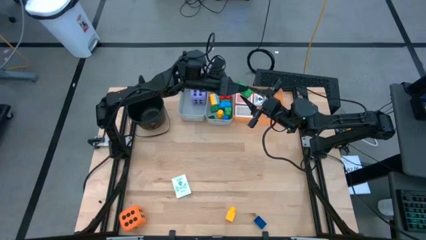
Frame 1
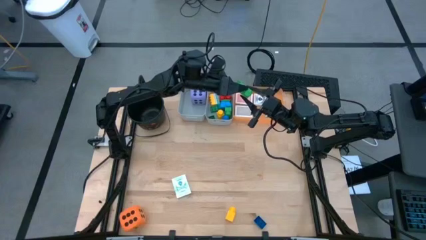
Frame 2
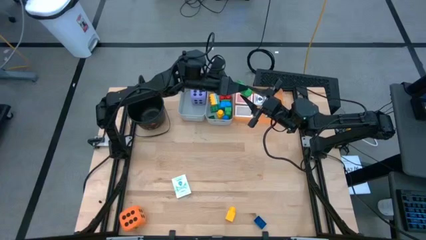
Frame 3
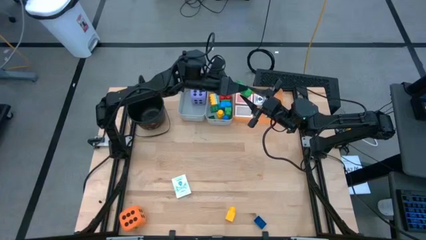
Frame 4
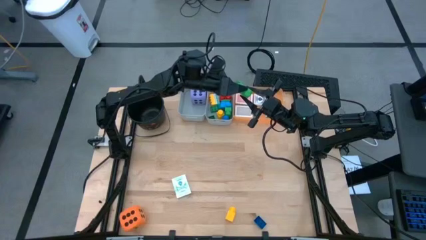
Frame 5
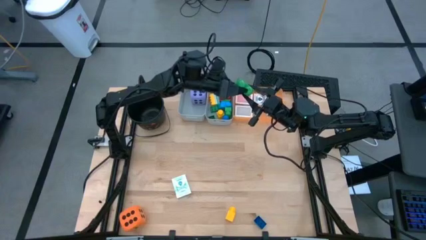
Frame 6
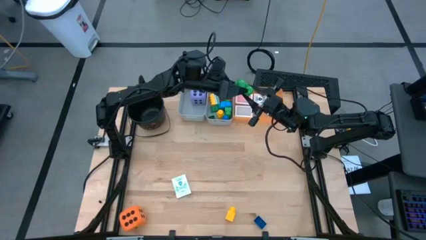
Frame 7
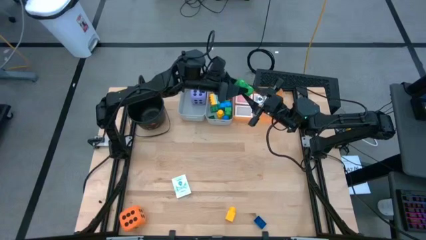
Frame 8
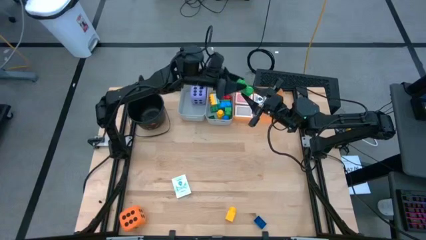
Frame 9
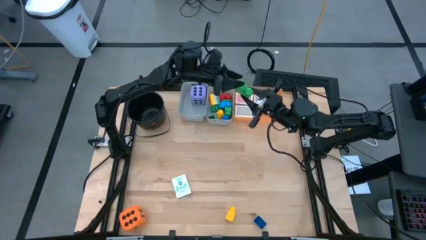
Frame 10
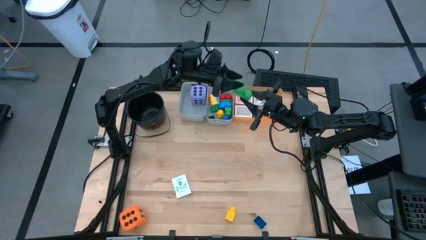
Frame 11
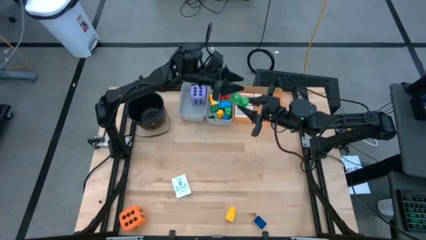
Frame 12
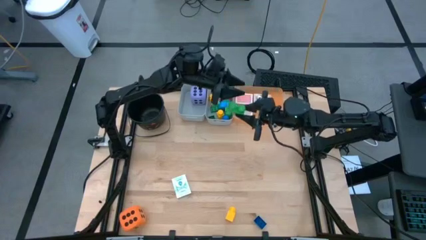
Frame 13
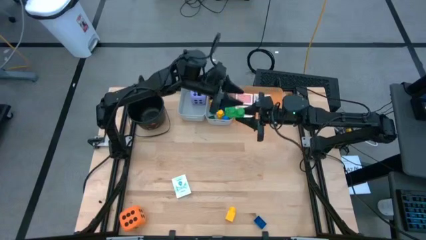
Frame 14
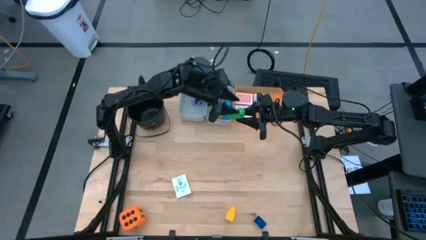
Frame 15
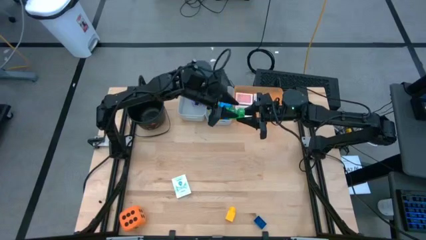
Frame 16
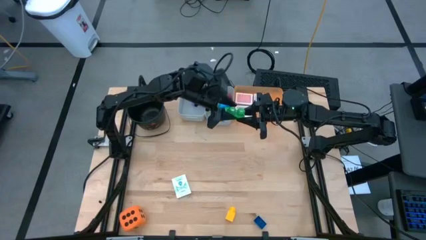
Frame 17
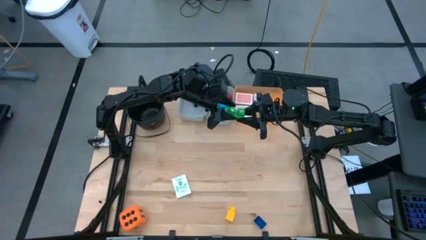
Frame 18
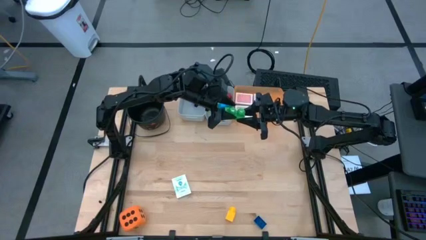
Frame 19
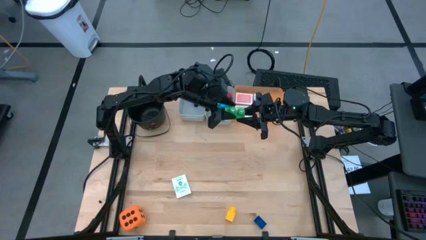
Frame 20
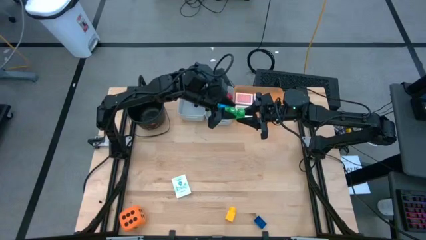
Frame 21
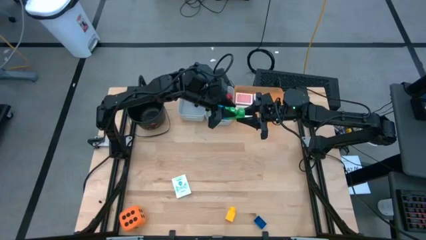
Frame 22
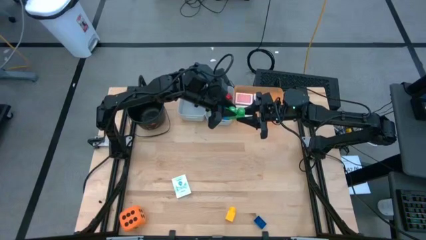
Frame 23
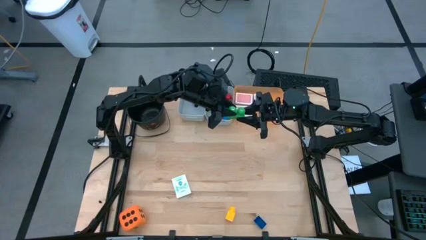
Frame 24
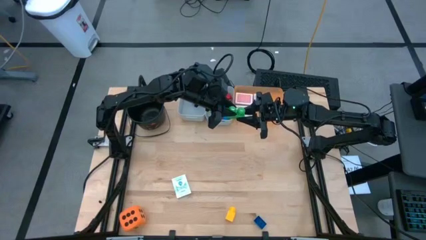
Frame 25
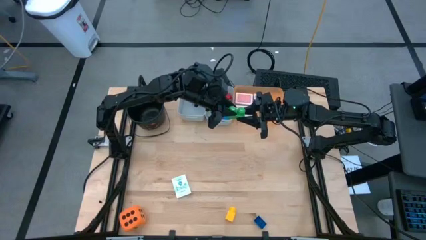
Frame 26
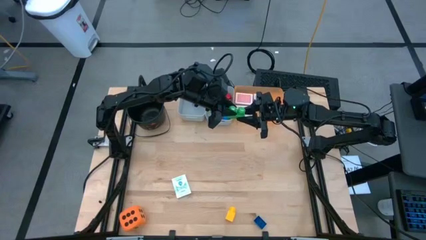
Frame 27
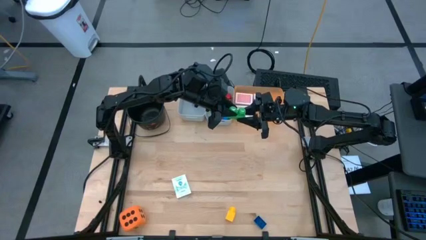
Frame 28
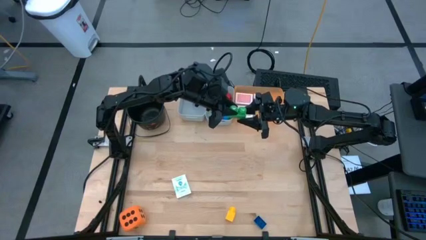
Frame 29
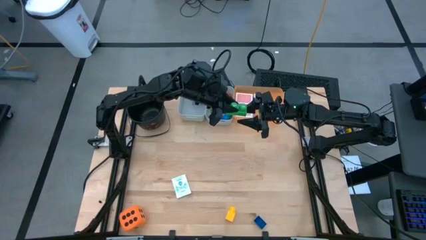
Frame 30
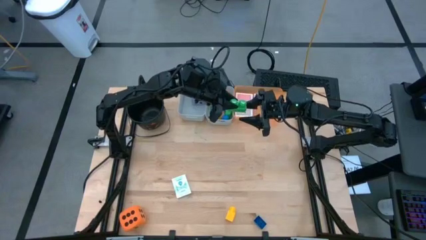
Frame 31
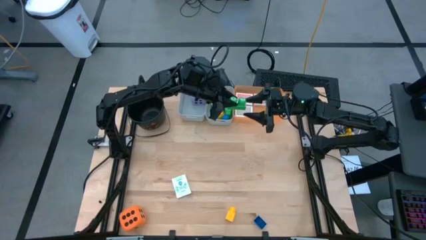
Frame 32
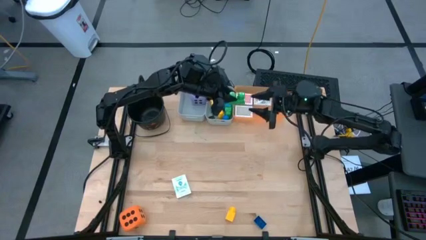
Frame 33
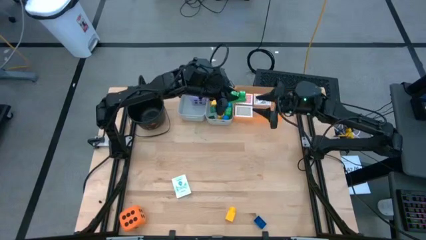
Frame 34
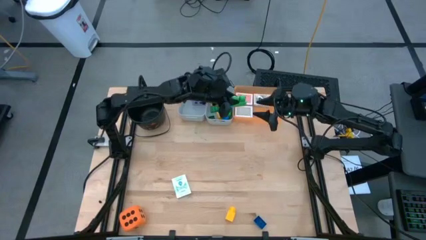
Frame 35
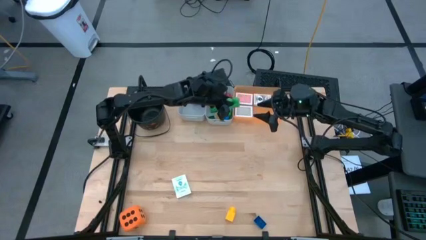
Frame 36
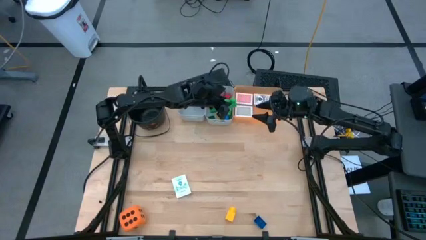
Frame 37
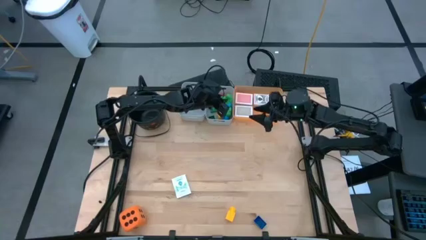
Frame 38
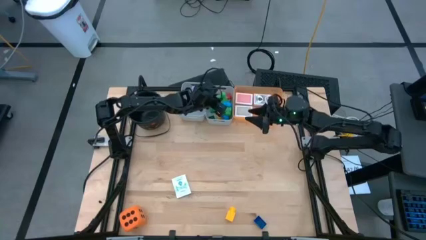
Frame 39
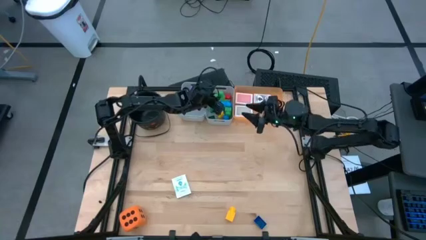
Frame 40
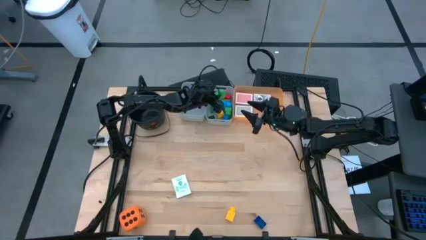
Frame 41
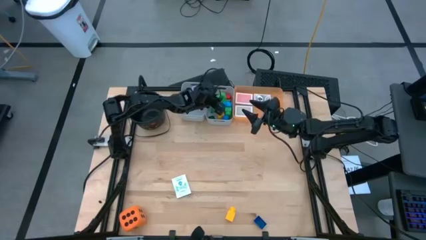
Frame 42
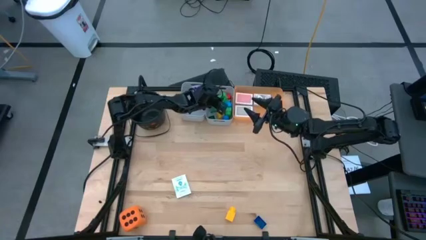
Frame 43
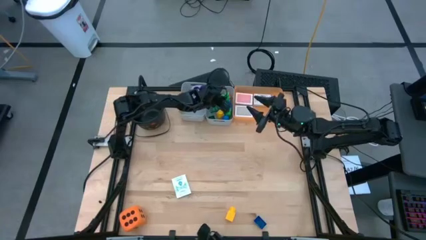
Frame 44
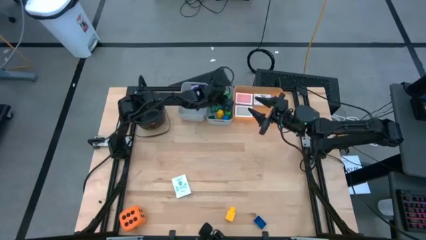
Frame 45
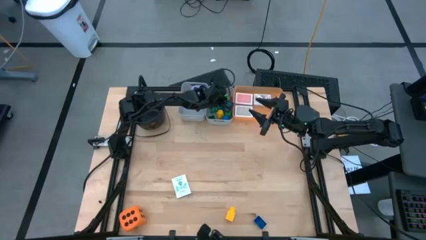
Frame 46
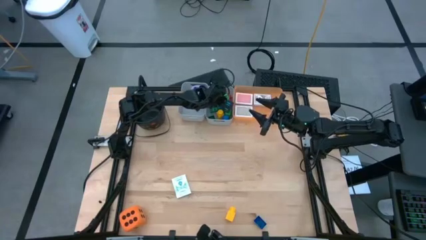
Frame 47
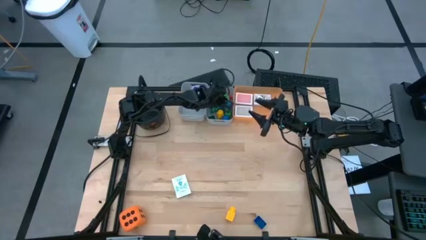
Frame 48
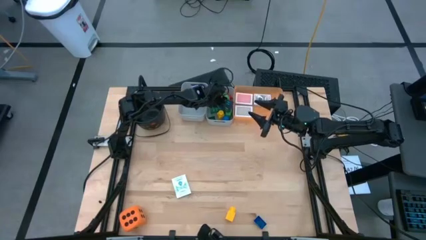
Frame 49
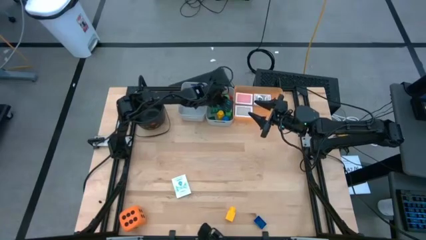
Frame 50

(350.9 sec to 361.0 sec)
Task: Pick & Place Toys
Put the green gamepiece into the right gray bin

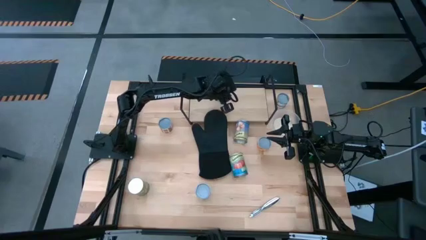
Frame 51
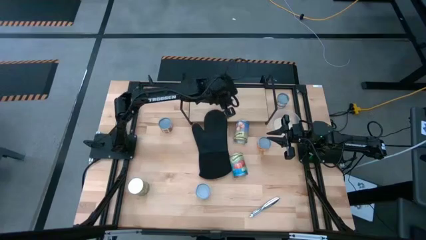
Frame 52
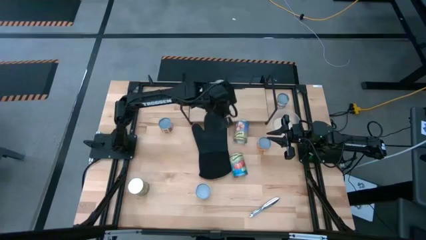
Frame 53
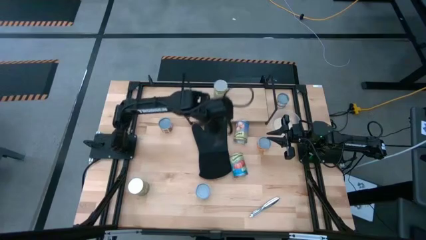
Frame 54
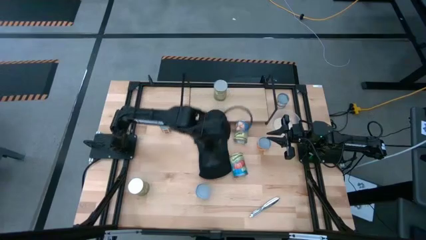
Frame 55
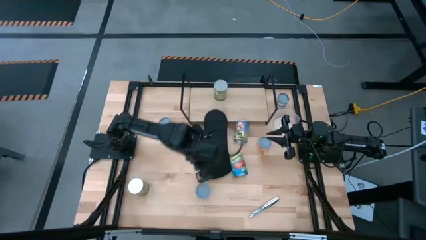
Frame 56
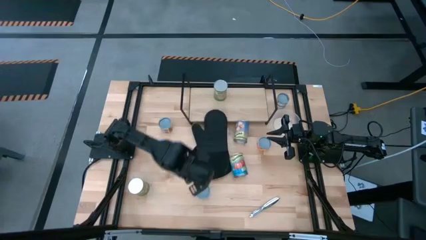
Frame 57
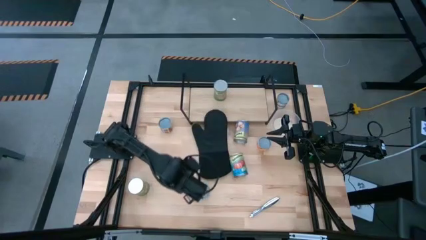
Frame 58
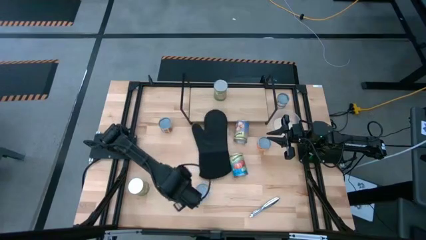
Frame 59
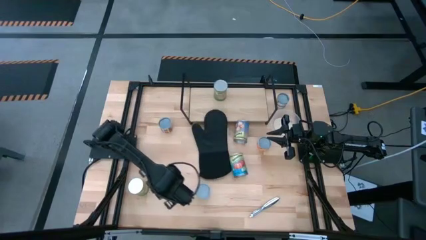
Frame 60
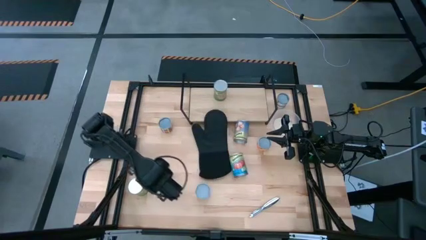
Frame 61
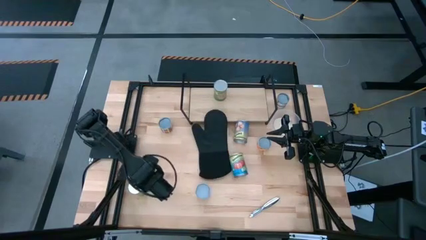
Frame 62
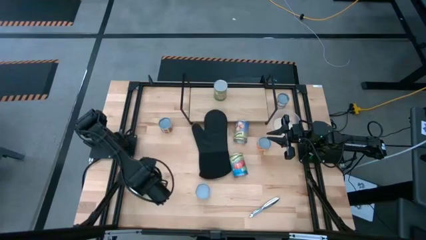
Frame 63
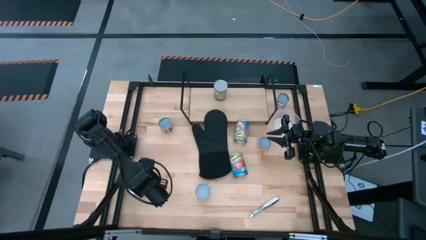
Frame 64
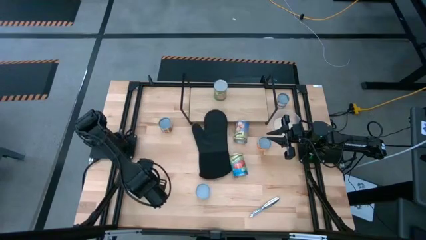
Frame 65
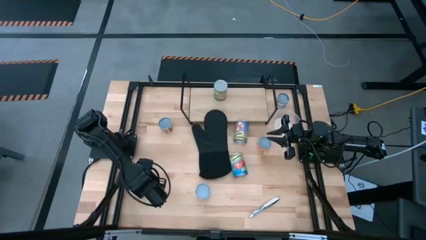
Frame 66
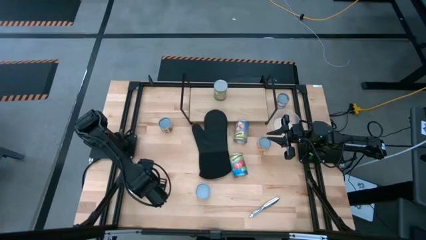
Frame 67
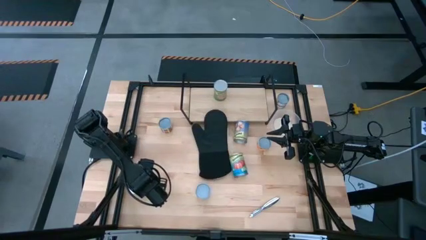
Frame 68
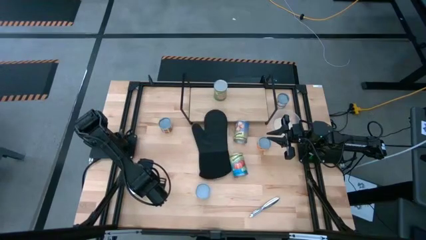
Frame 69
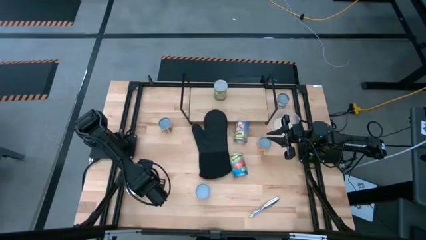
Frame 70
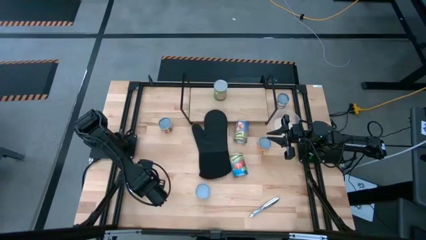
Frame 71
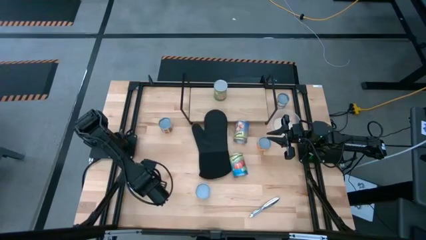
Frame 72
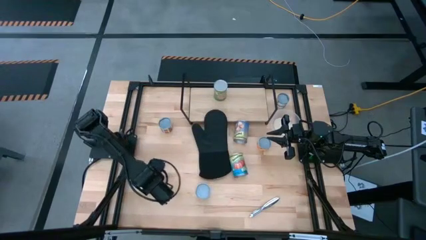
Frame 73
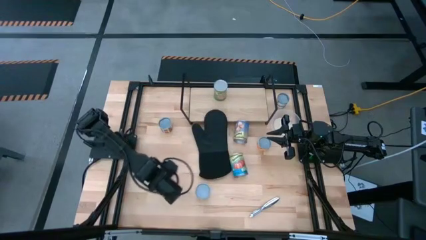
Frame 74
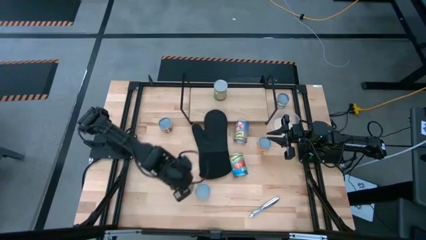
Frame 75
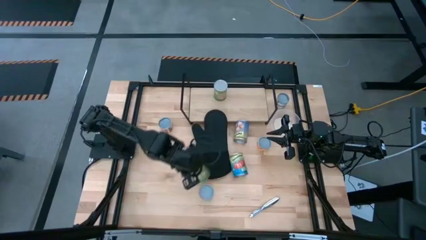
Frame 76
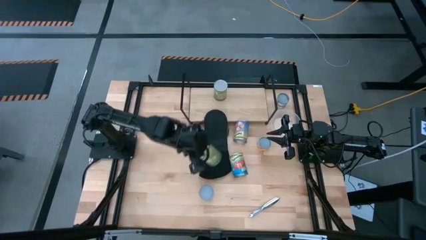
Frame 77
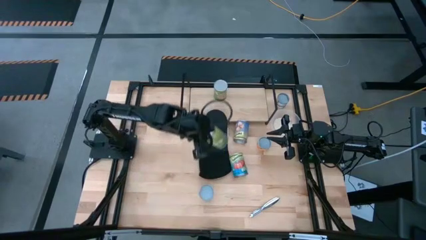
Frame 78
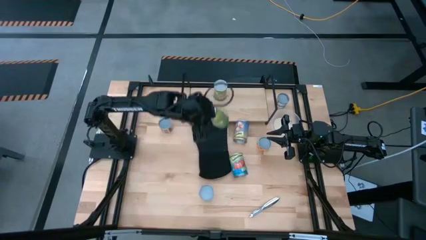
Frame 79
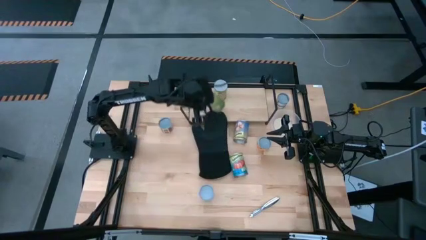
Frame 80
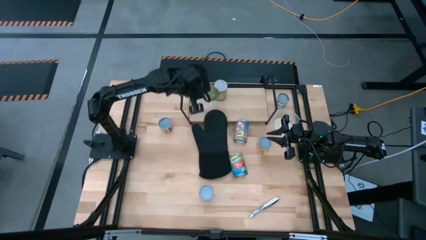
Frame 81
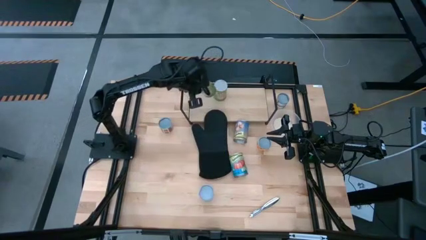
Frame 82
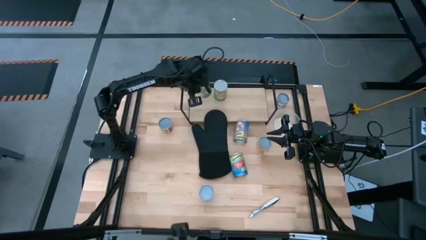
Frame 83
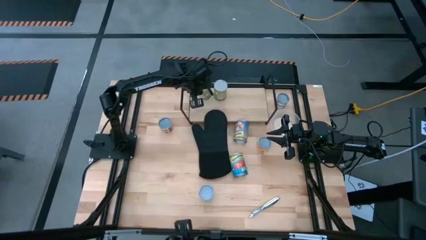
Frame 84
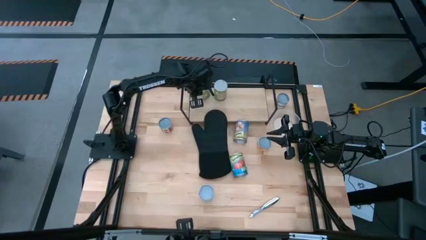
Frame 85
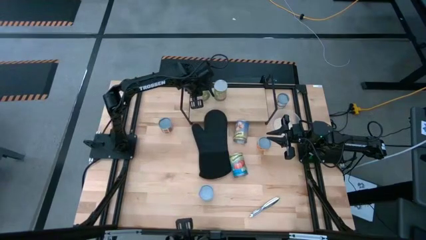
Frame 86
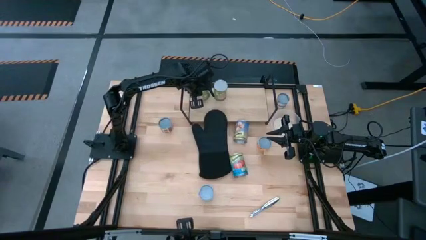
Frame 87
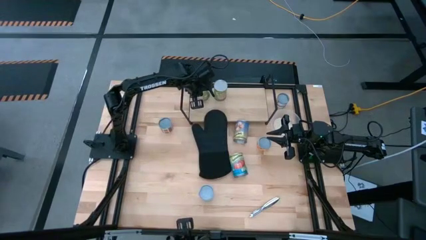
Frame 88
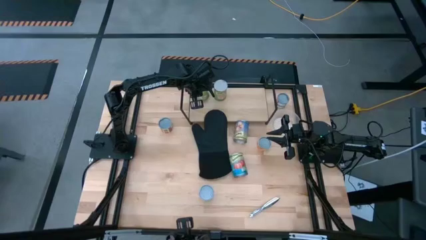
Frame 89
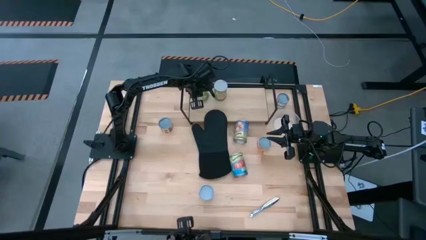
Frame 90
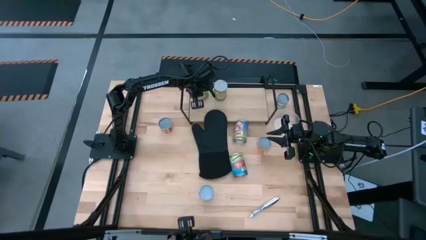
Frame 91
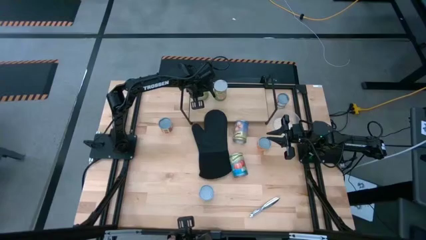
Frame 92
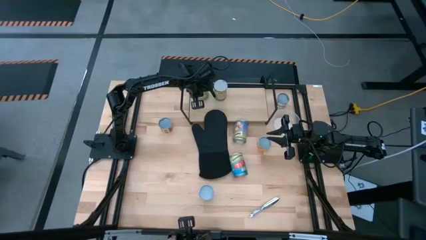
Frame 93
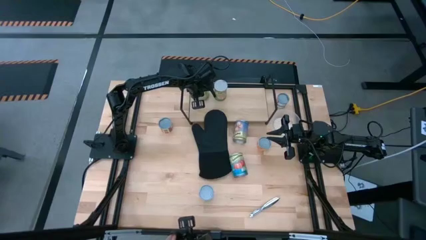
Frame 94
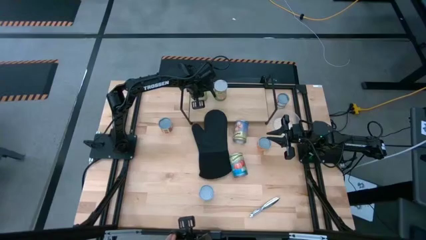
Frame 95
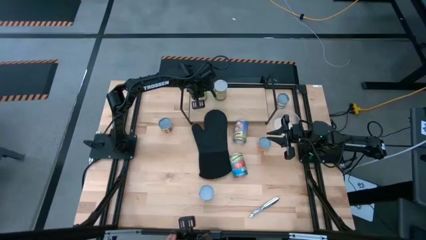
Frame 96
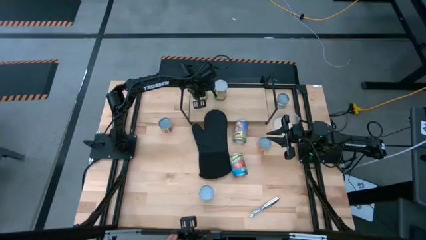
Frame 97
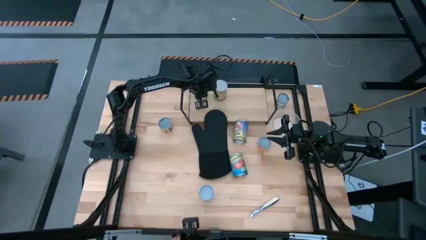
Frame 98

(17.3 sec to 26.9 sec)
Task: Pick and place cans onto a shelf
Put the canned pears on the shelf
